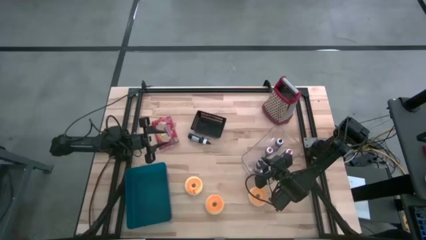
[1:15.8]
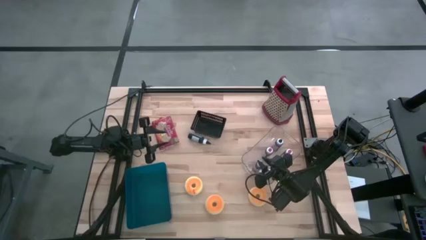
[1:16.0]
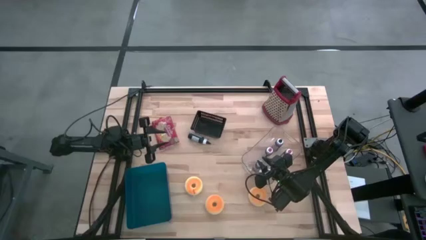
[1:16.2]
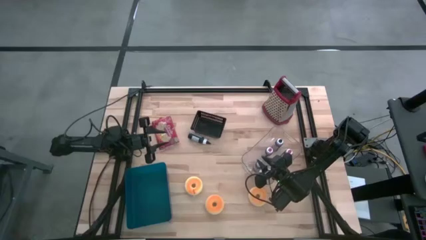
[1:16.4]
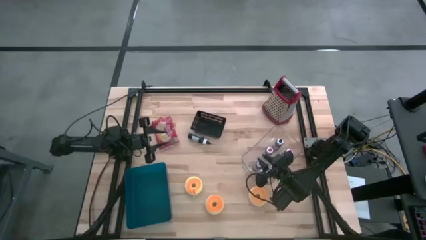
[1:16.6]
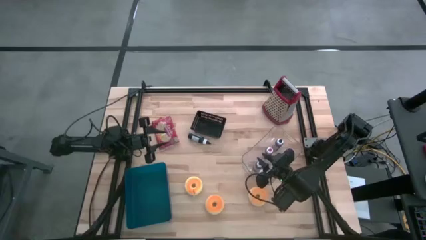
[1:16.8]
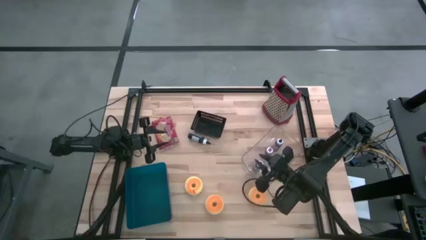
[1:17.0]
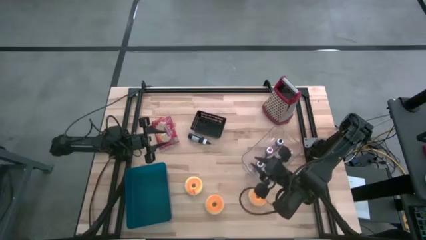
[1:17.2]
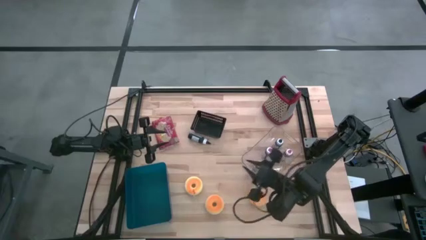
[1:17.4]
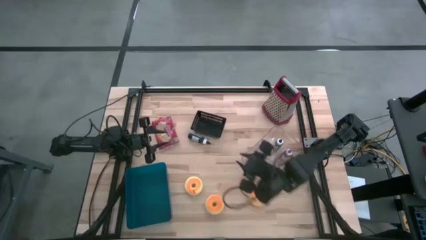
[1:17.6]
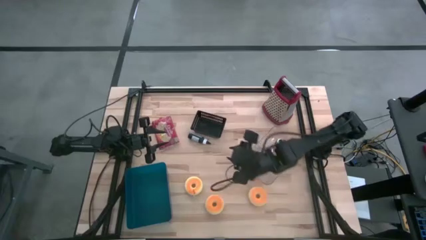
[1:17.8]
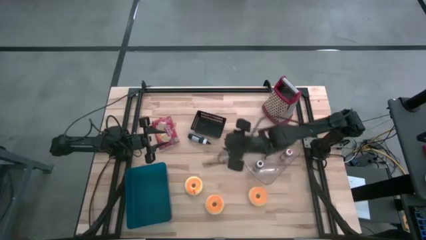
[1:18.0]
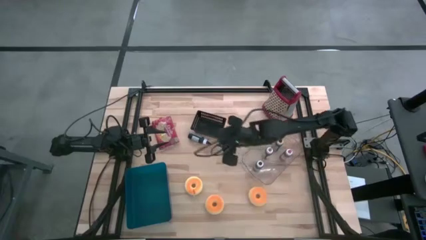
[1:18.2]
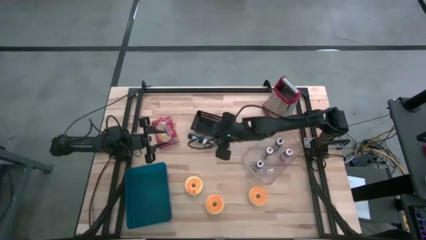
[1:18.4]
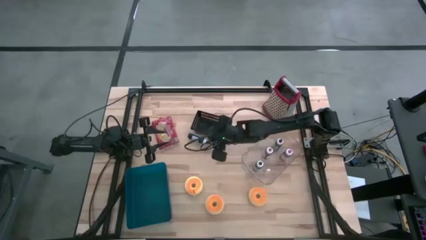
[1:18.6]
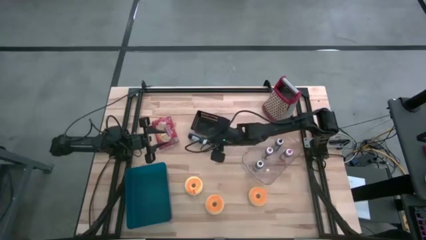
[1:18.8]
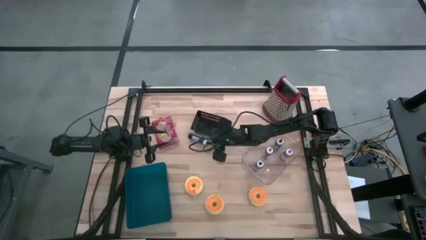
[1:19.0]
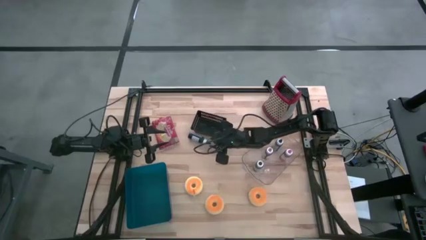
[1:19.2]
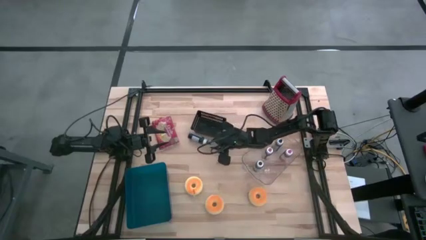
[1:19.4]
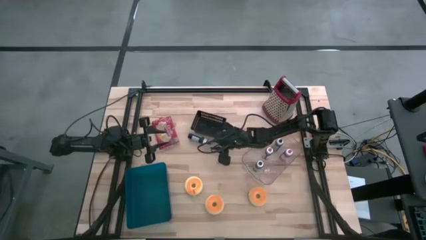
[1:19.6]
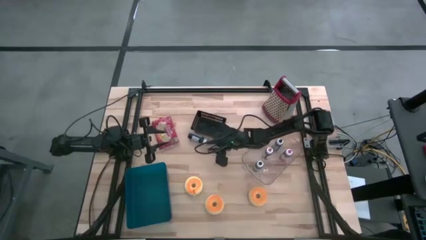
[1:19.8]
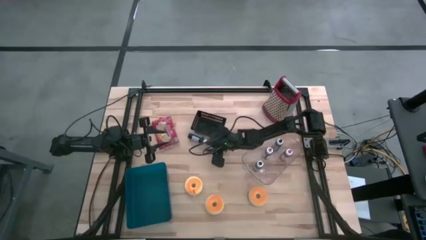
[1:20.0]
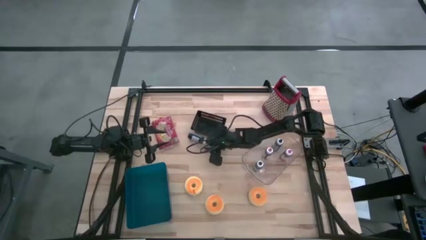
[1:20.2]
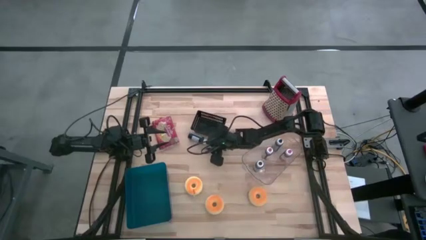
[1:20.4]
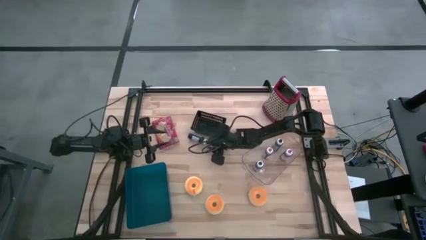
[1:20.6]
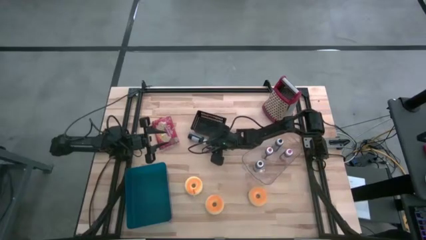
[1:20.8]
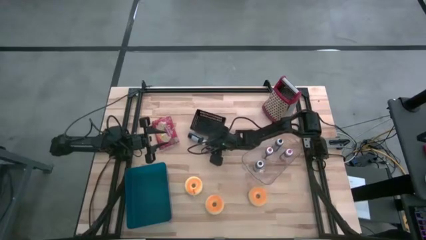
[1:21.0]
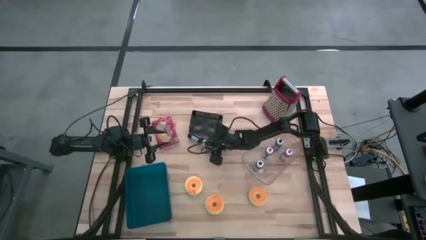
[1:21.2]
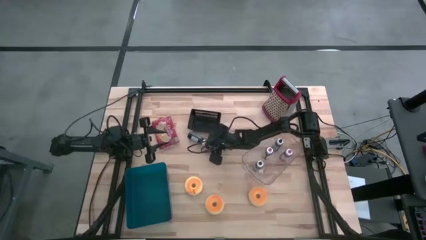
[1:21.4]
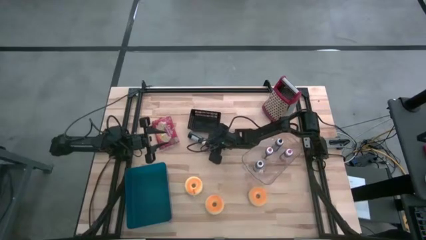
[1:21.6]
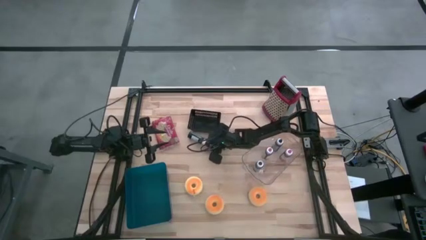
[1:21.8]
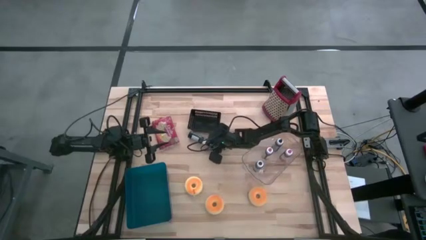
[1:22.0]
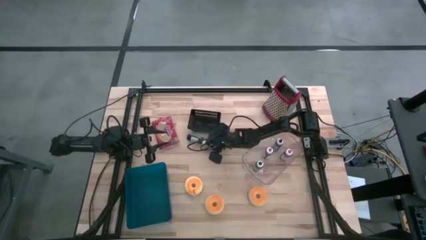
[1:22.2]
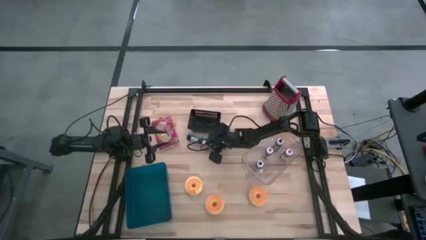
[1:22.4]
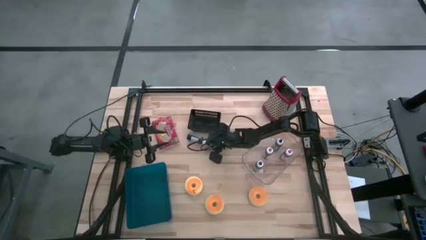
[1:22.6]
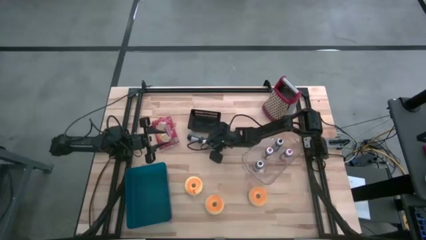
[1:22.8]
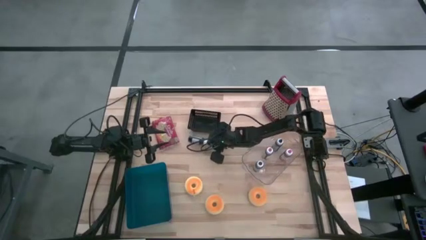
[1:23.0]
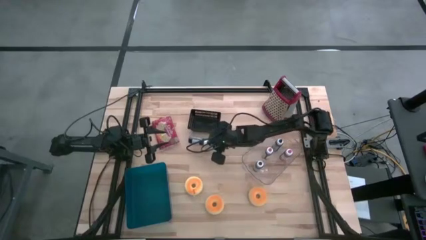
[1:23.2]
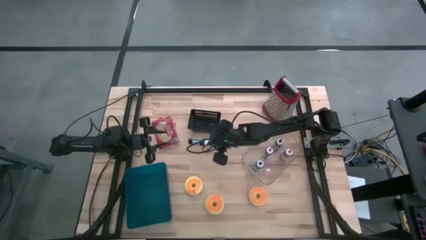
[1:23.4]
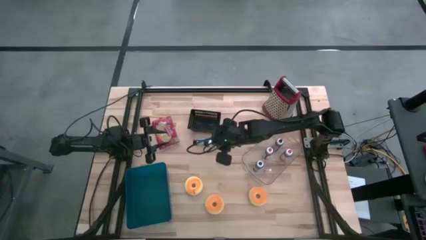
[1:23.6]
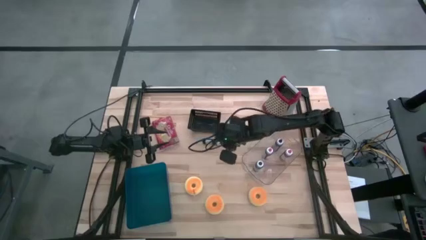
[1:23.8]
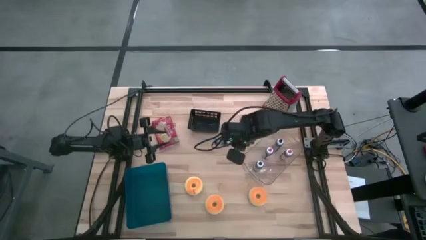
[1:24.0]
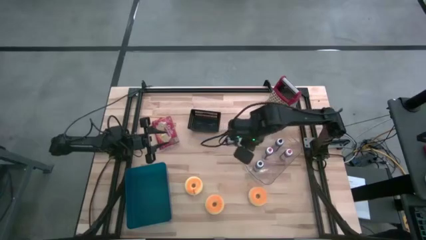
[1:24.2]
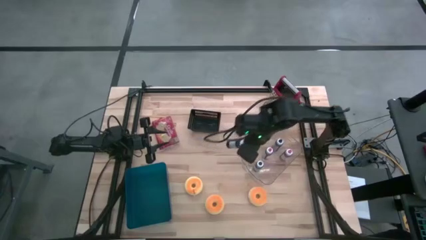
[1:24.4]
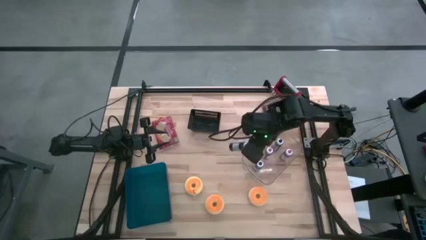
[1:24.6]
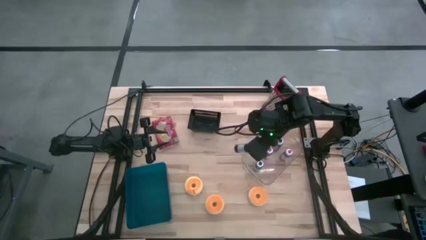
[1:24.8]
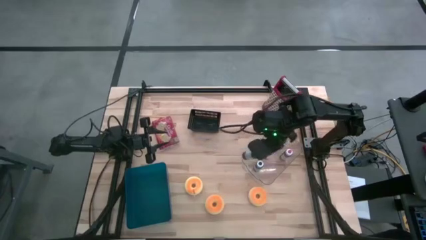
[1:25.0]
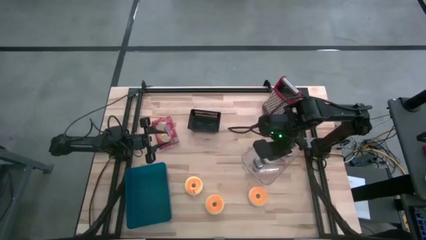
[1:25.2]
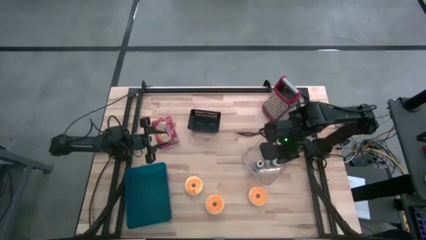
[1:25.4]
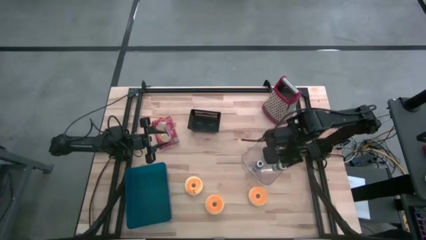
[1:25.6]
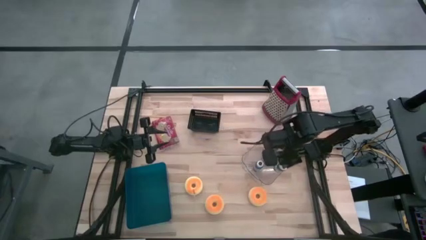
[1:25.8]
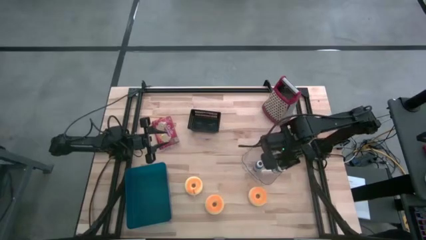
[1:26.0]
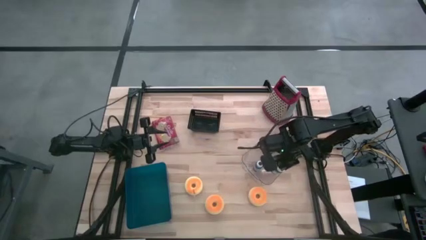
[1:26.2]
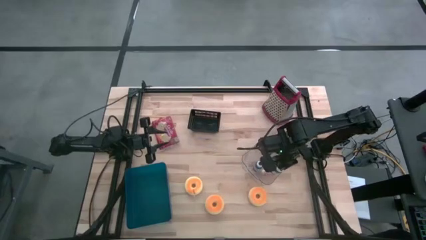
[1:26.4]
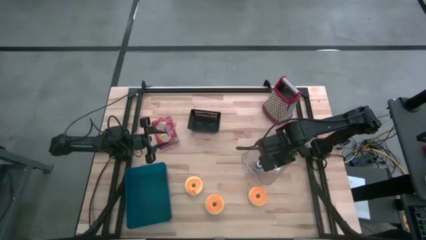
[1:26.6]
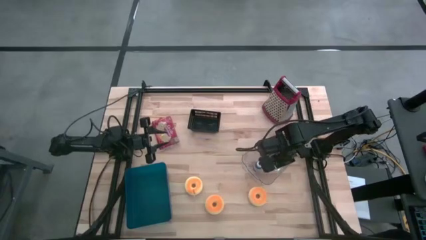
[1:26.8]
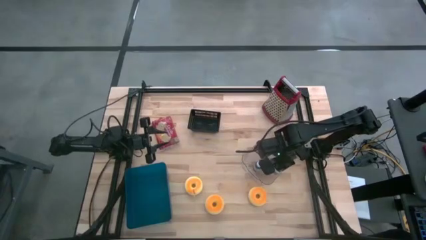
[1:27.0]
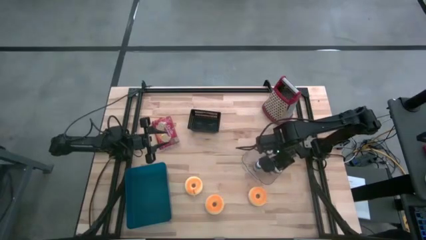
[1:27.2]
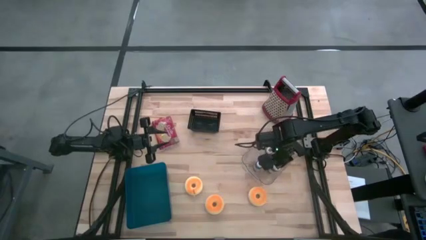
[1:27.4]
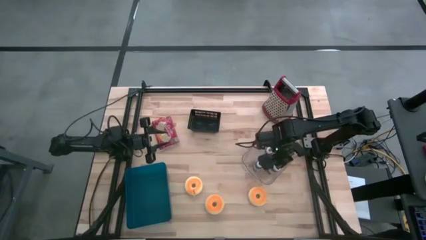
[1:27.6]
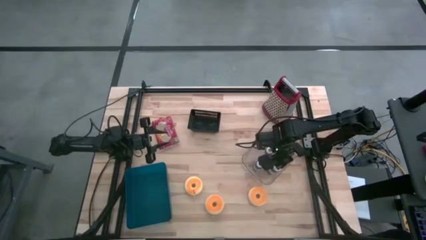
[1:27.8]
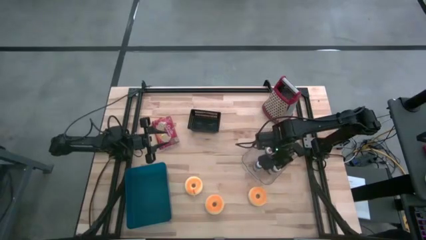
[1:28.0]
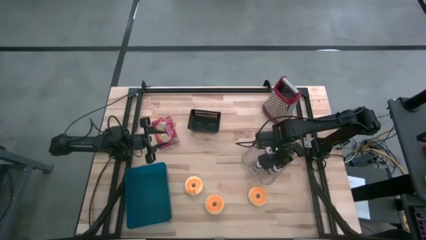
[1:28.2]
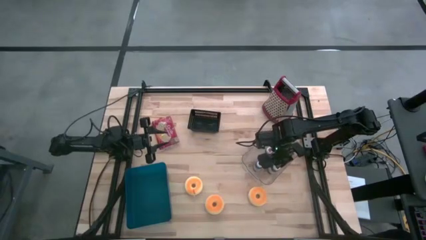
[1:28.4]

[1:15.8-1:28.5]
Task: Pick & Place Food Item
Put the black food coloring bottle into the transparent bin

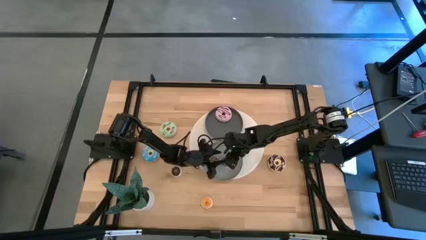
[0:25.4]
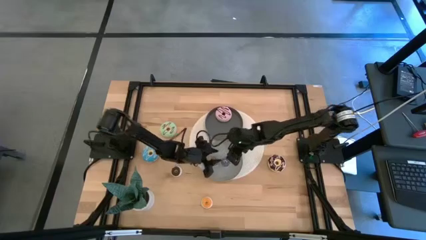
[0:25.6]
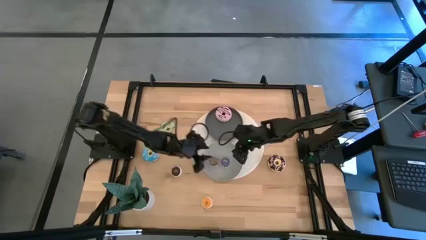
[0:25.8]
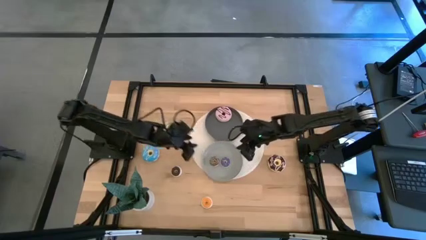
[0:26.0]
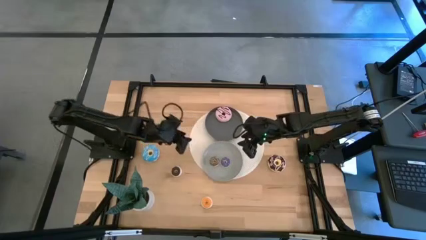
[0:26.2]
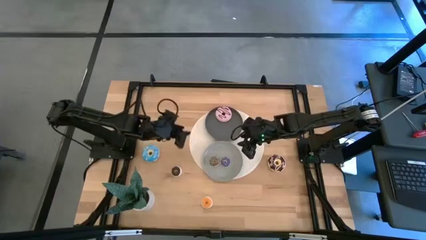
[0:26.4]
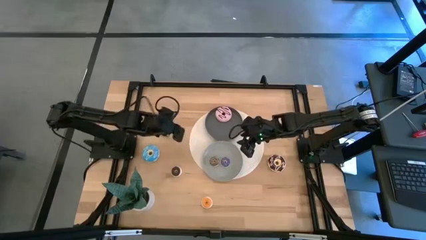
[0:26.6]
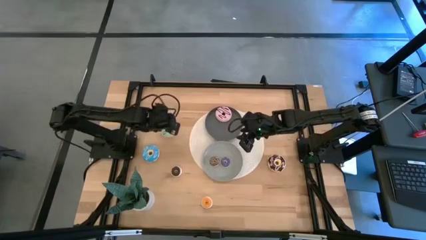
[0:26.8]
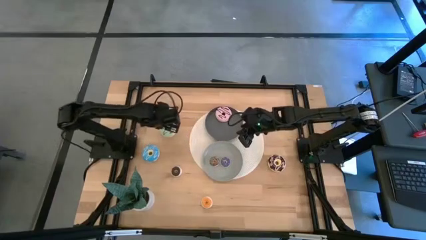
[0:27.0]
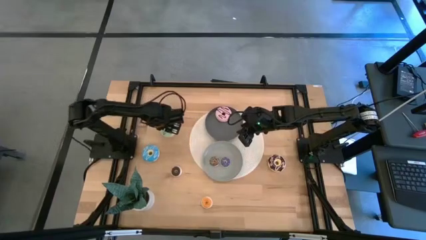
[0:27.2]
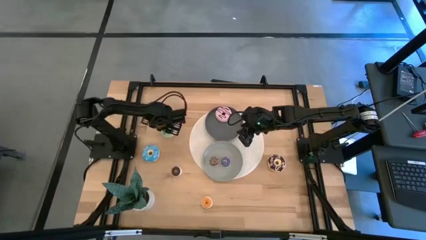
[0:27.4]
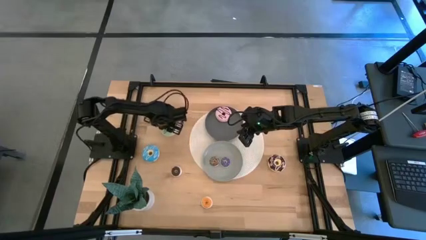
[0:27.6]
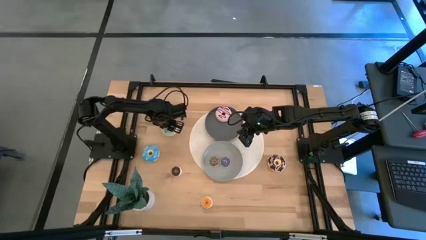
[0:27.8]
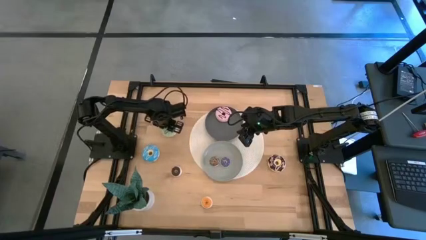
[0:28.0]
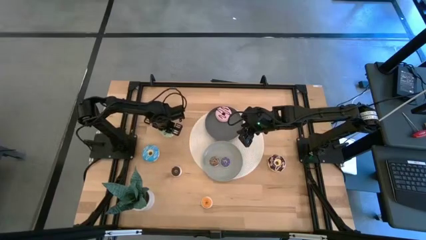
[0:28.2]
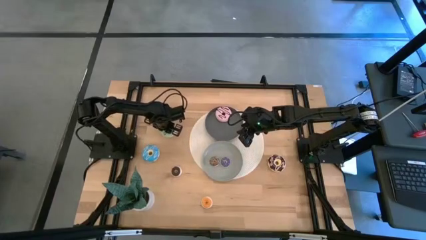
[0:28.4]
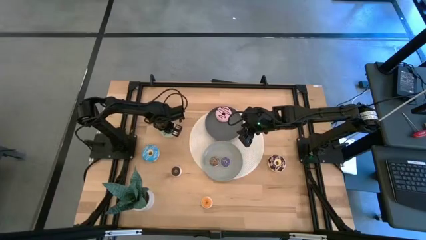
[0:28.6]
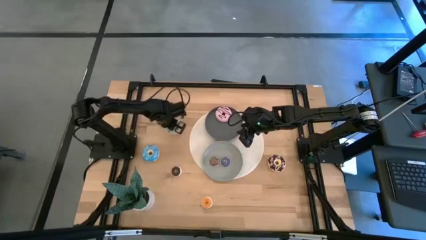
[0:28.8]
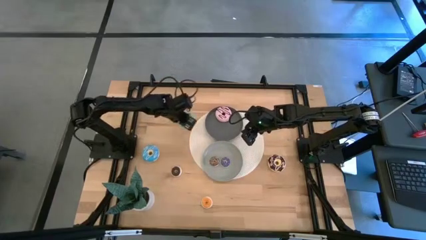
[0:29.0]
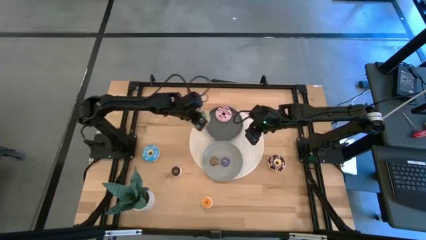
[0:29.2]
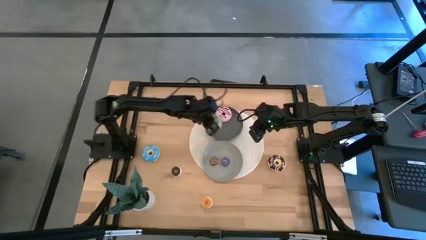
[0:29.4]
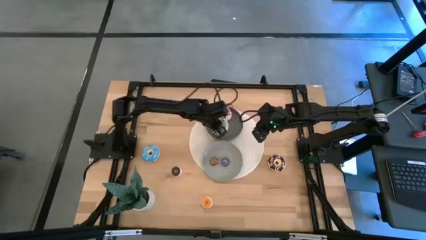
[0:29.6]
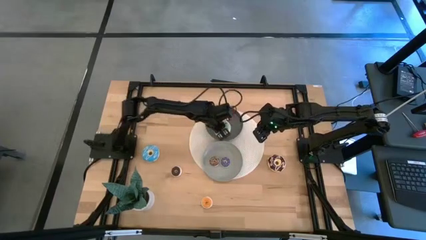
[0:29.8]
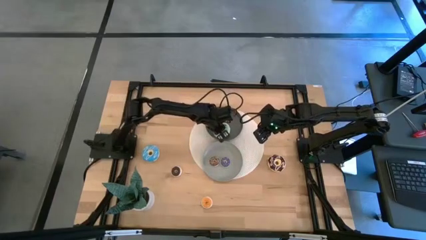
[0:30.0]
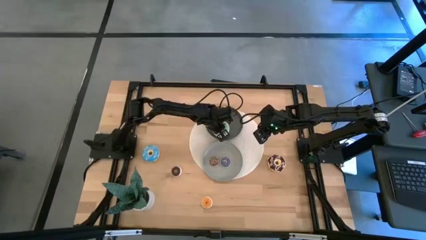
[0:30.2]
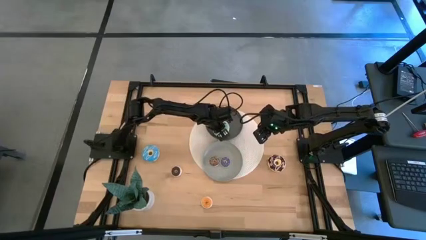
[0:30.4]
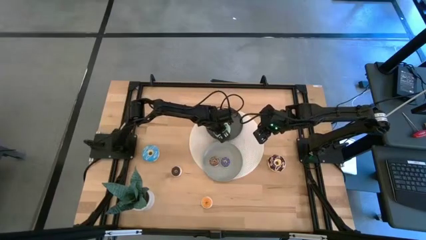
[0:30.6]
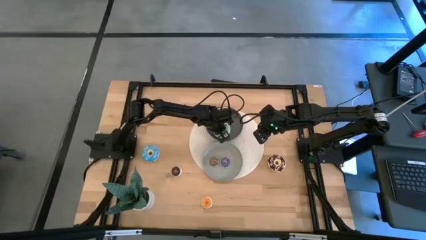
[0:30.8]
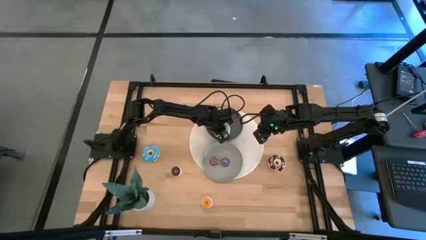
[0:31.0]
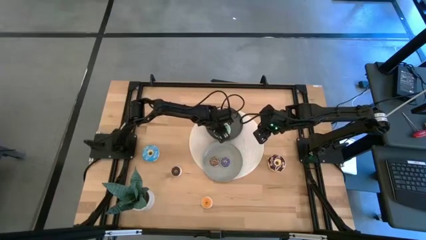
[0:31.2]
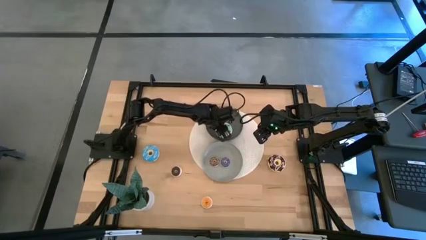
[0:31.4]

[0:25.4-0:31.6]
Task: Pick & Place donuts
Put the big green donut on the black plate
